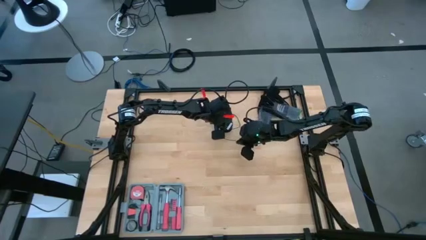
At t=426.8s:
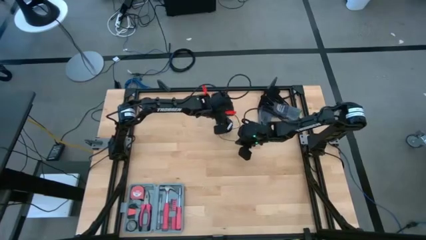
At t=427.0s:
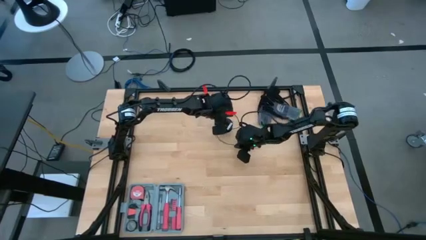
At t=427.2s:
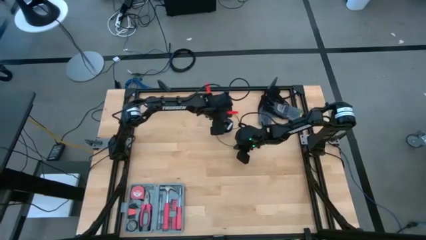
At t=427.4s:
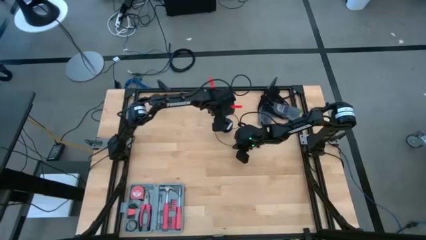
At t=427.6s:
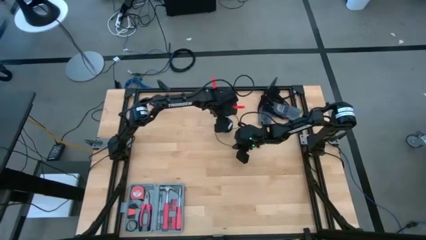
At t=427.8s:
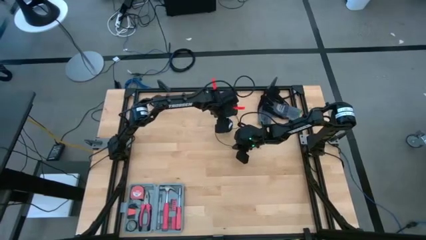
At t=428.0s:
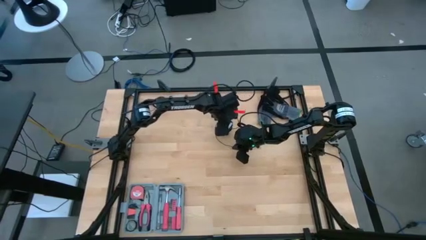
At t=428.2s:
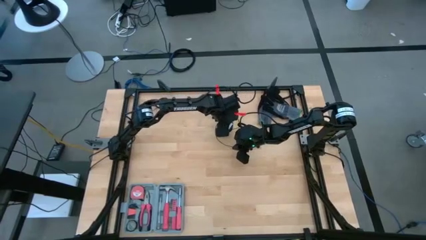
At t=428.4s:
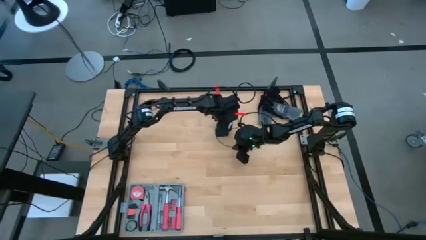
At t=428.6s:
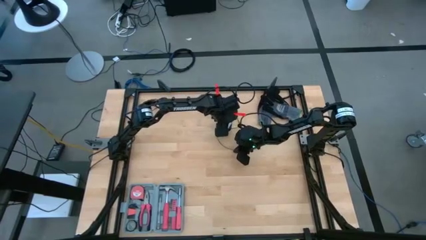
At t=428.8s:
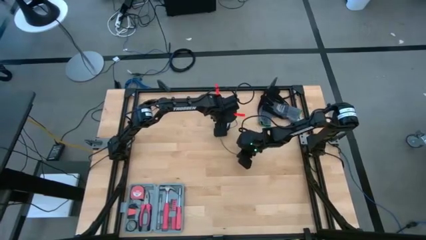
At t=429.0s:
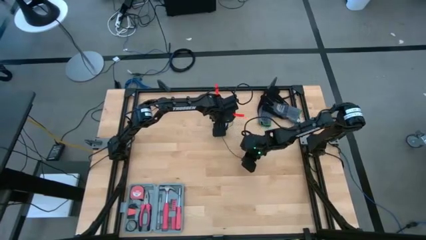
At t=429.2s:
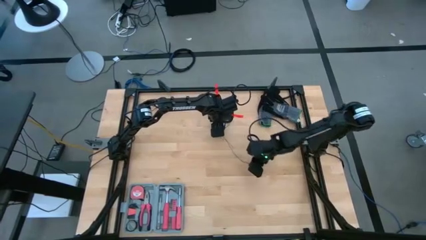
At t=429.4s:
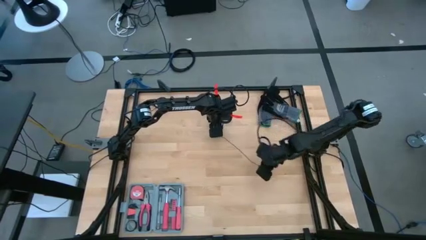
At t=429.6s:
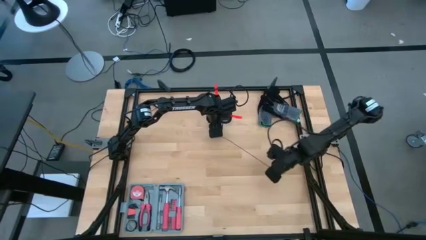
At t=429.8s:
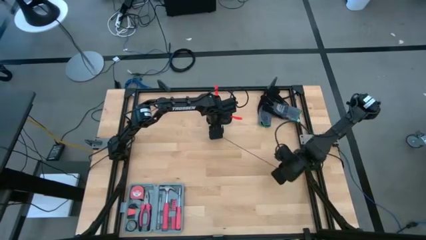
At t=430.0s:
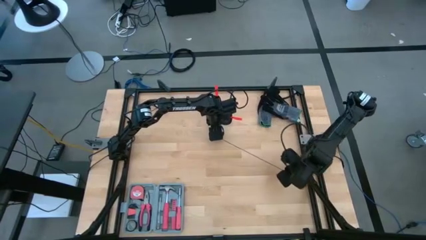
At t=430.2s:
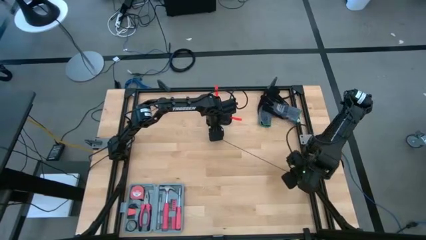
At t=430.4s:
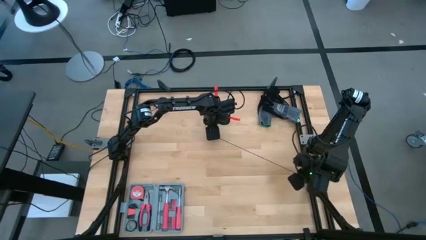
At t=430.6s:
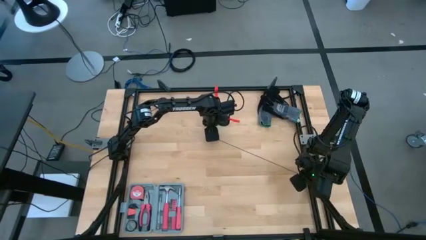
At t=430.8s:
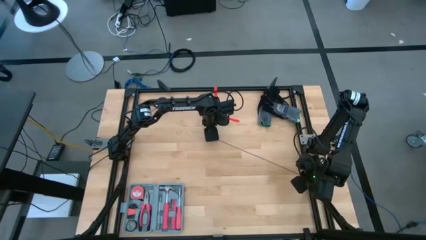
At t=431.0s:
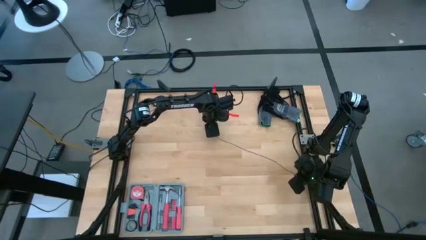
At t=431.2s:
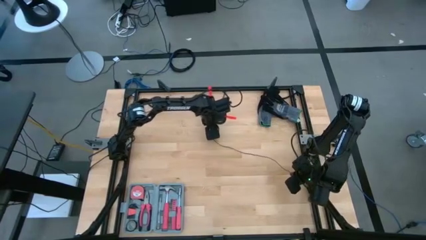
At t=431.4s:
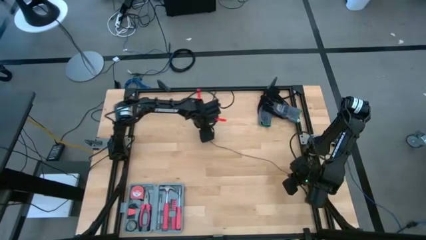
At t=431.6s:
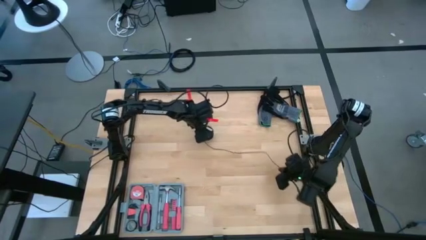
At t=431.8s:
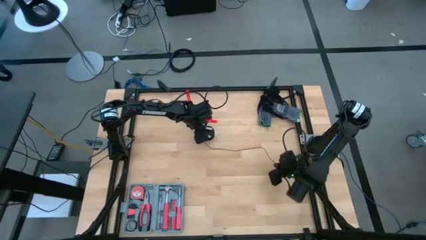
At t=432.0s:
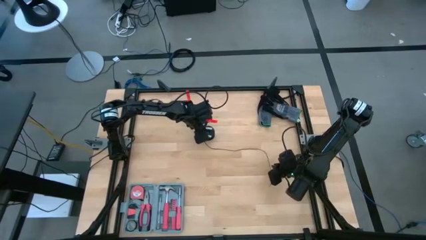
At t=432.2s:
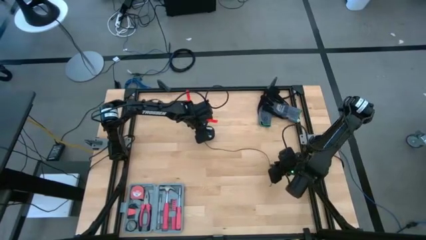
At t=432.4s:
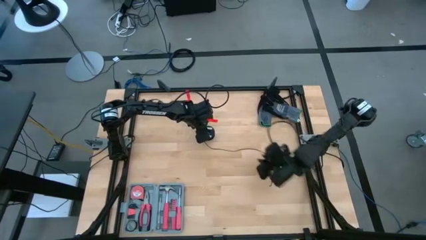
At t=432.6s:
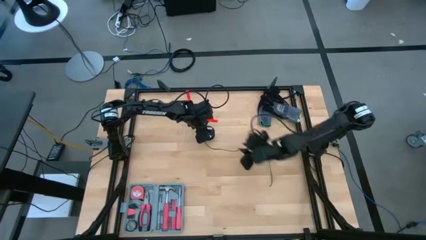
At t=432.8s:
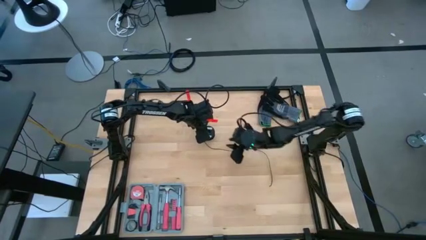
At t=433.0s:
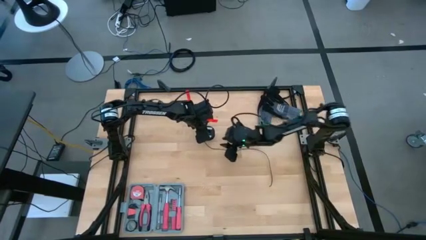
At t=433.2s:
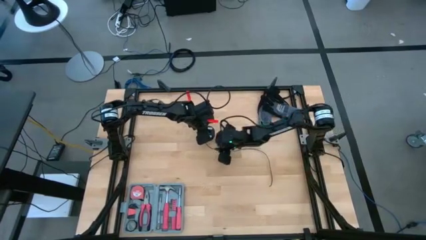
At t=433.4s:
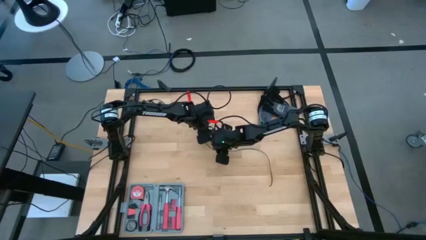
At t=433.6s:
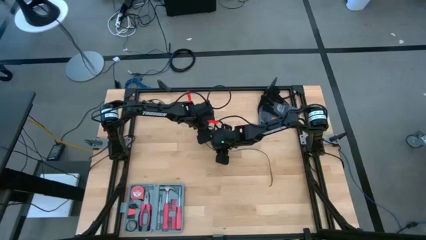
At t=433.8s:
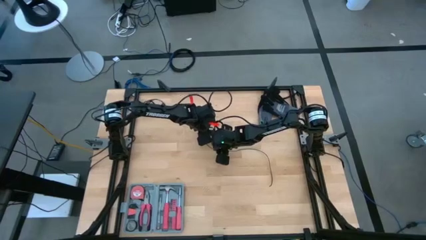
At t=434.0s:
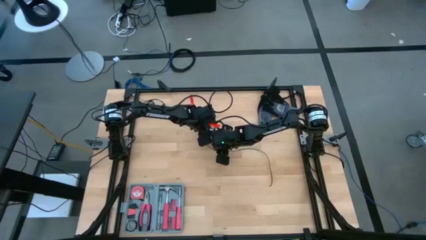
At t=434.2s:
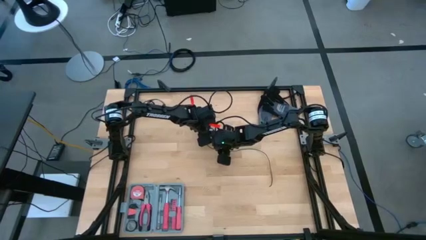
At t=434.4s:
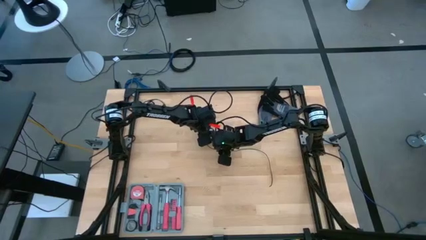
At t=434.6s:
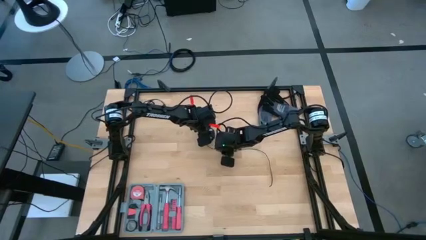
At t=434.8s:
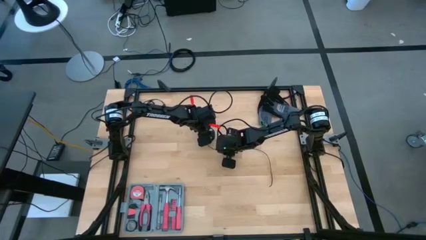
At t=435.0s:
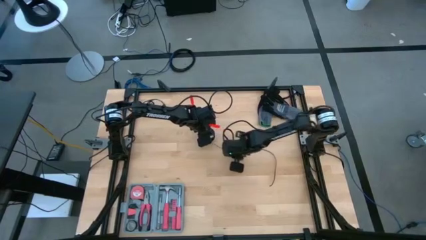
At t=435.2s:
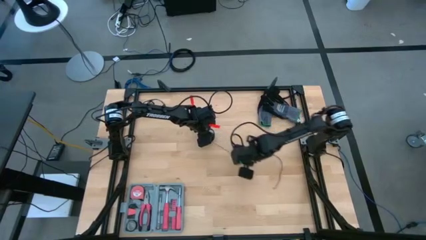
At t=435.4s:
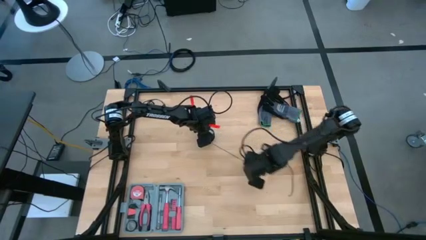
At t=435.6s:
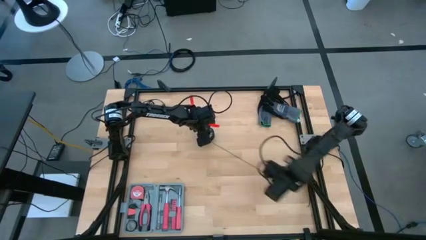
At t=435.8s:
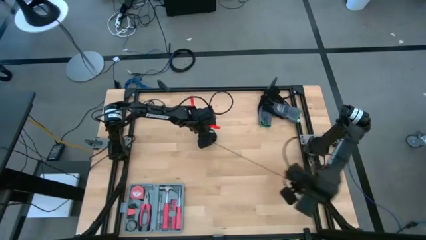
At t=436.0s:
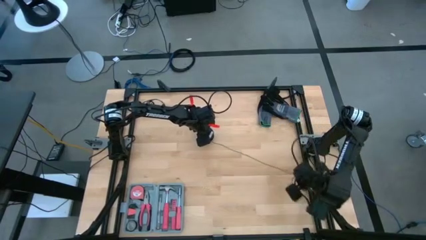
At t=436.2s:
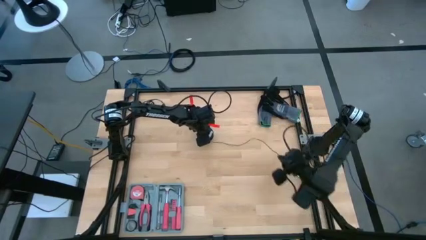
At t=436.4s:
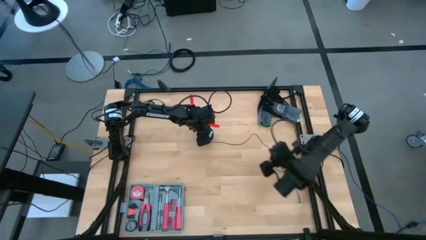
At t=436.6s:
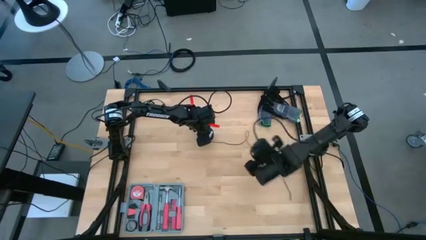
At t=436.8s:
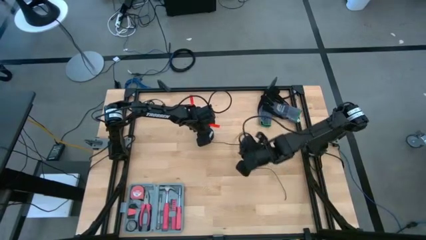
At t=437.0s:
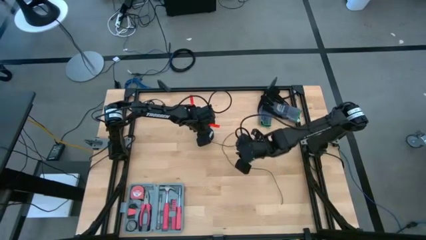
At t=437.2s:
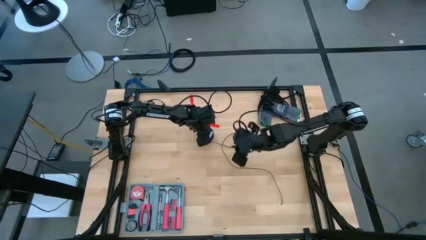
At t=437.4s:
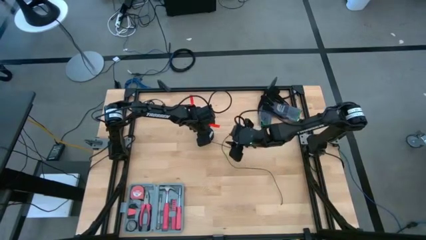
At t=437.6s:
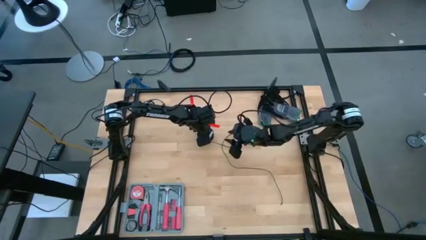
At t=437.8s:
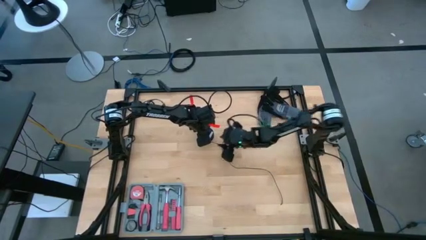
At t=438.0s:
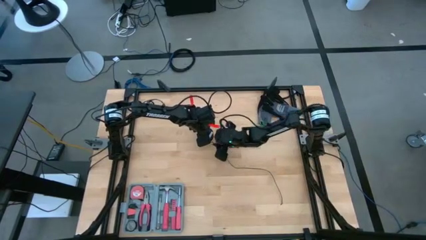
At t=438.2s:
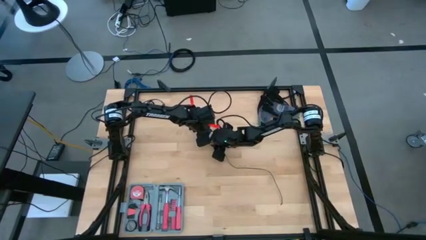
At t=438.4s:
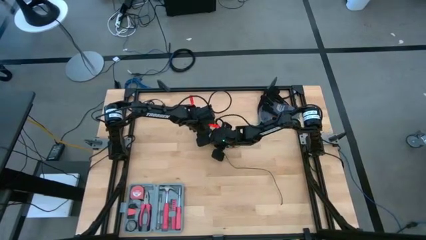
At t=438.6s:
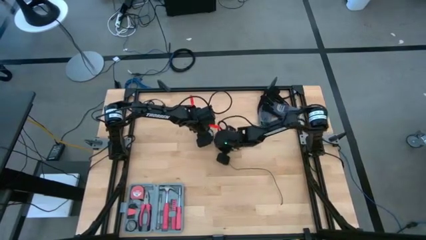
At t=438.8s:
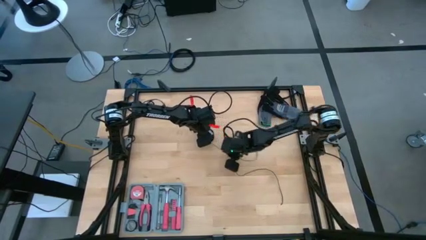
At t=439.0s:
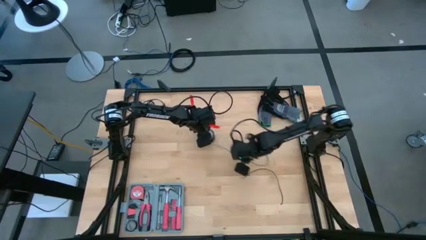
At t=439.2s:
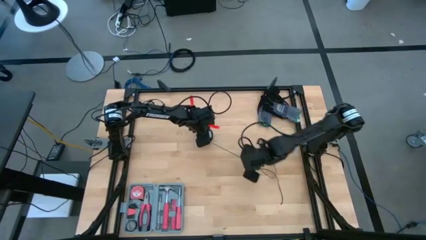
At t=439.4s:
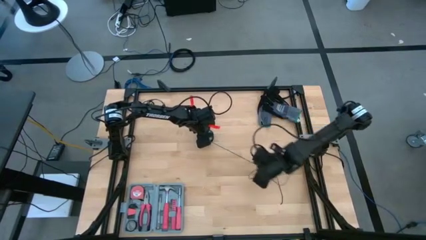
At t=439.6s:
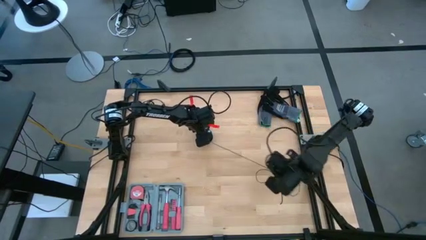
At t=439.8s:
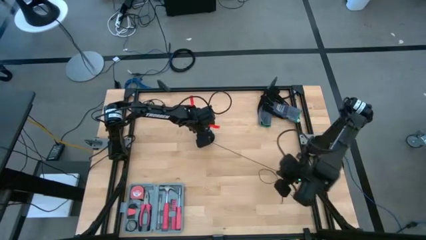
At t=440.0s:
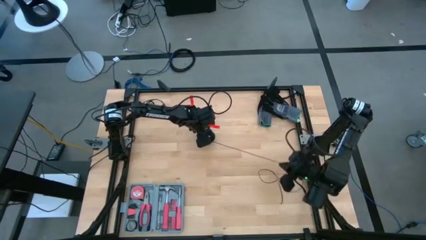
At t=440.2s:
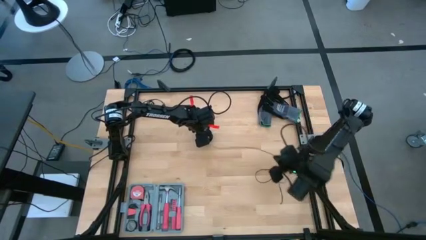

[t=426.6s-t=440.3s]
Task: Coil cords
Uncoil the black wire from the black spool
